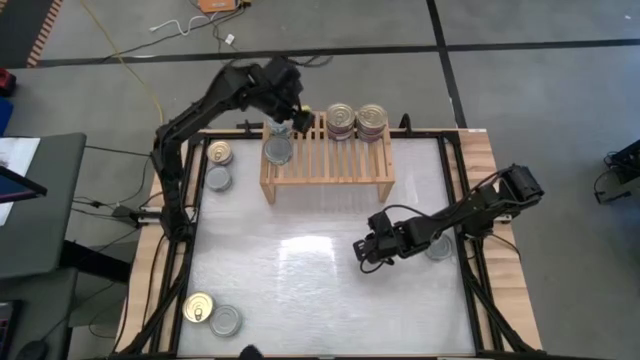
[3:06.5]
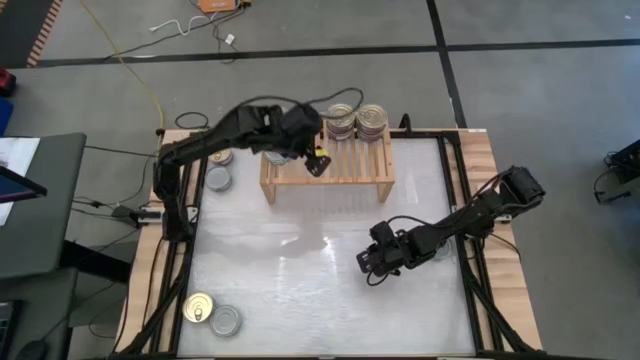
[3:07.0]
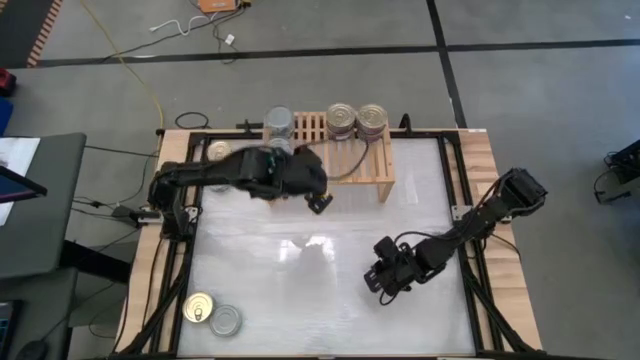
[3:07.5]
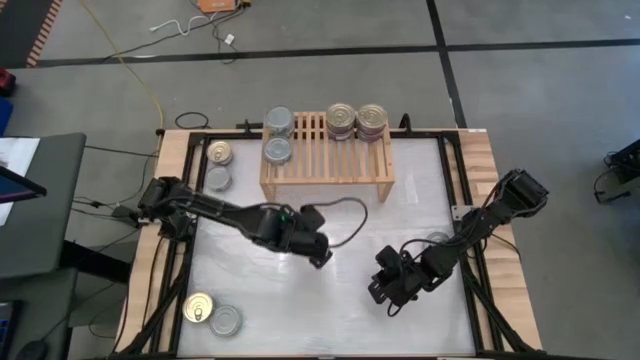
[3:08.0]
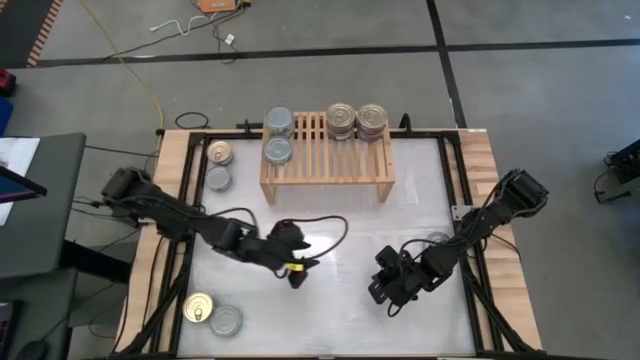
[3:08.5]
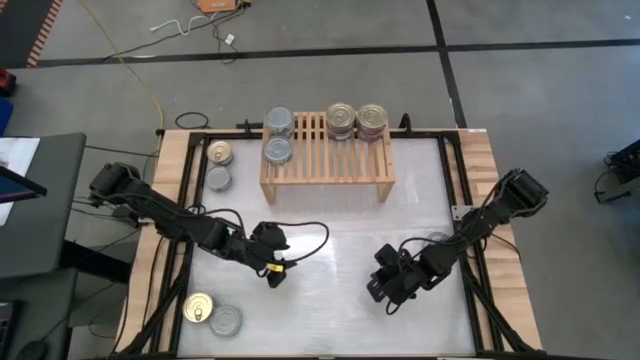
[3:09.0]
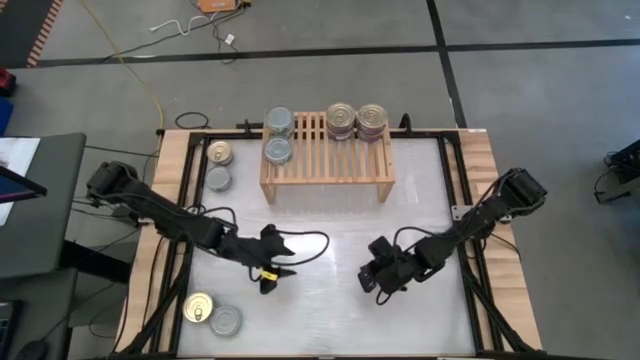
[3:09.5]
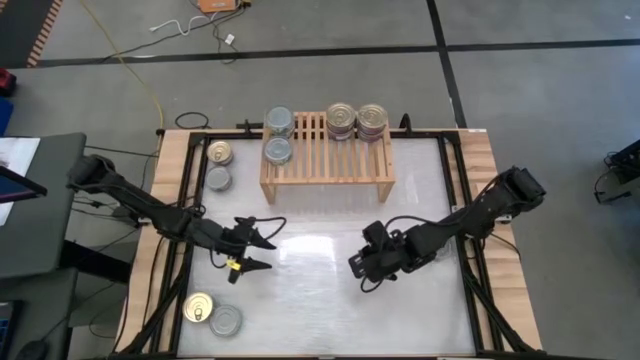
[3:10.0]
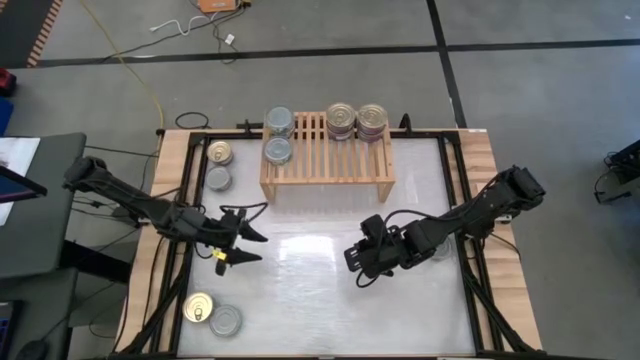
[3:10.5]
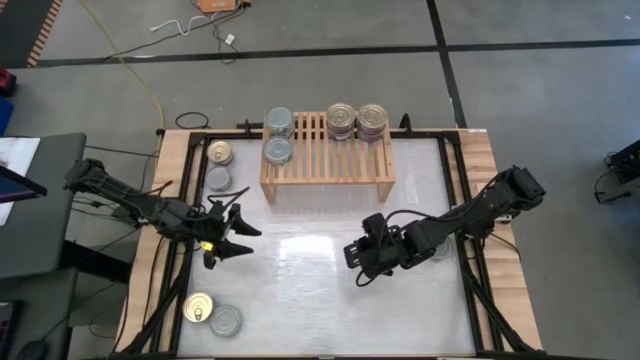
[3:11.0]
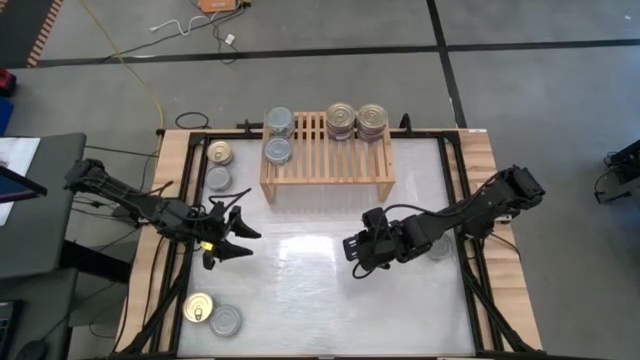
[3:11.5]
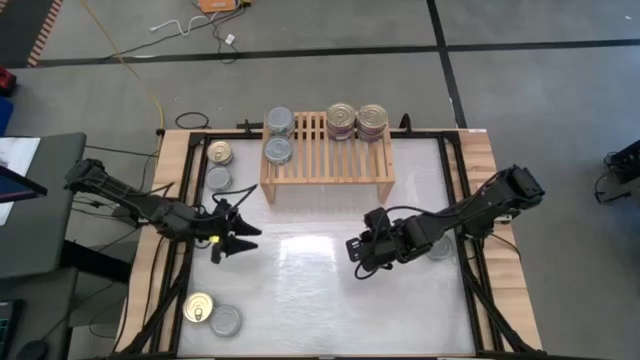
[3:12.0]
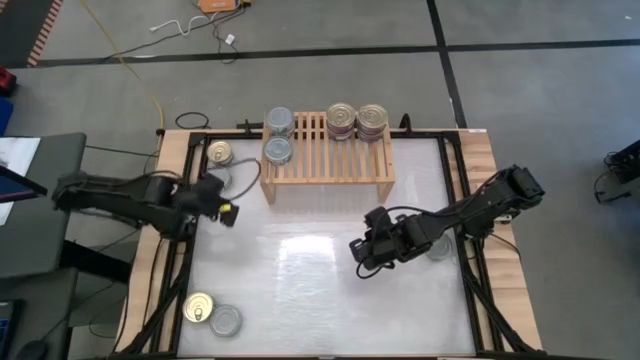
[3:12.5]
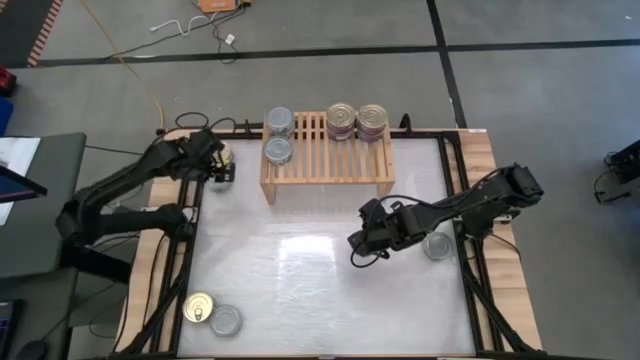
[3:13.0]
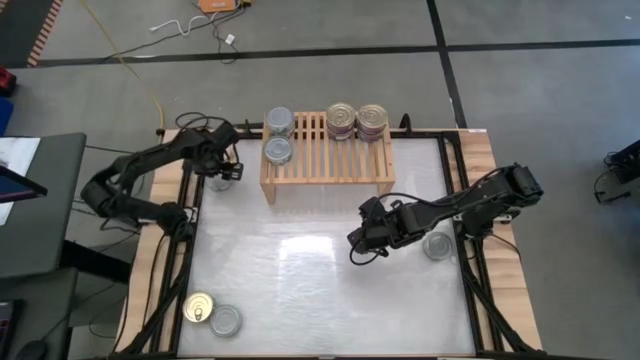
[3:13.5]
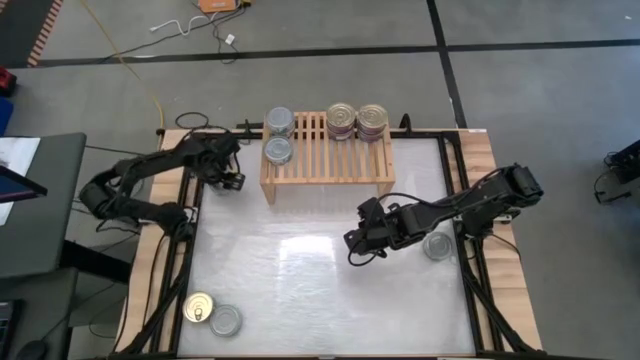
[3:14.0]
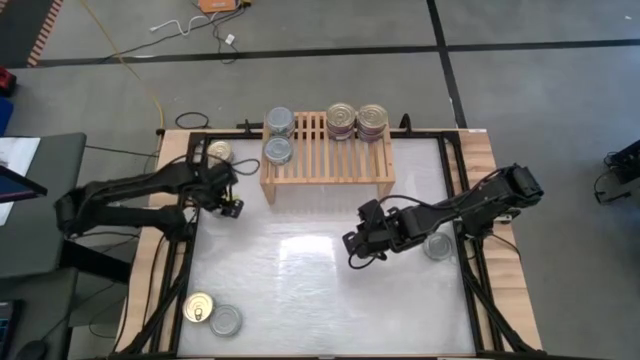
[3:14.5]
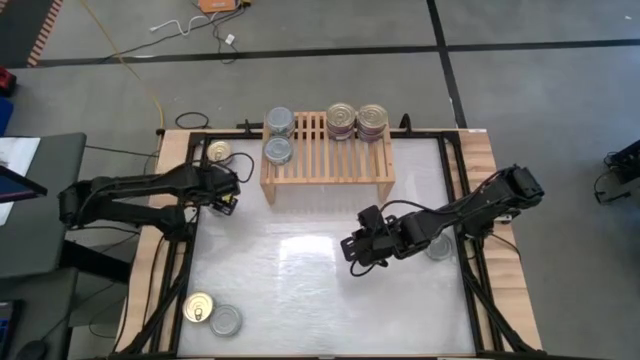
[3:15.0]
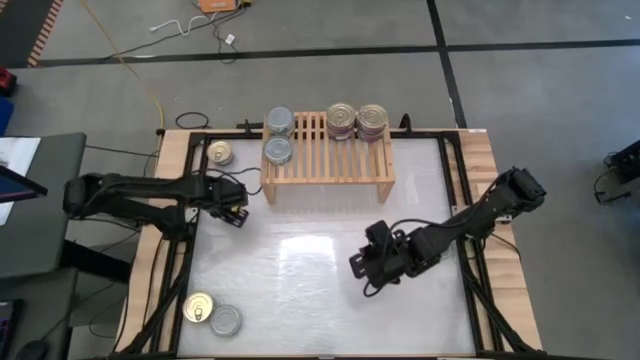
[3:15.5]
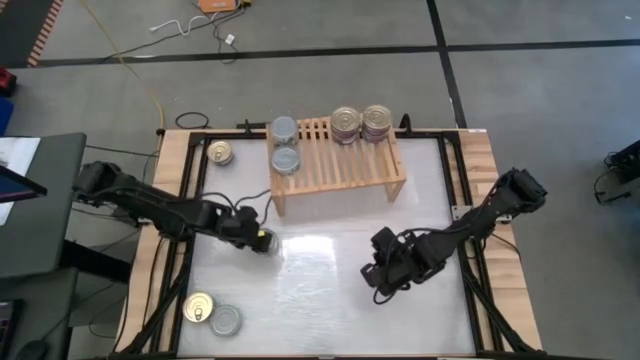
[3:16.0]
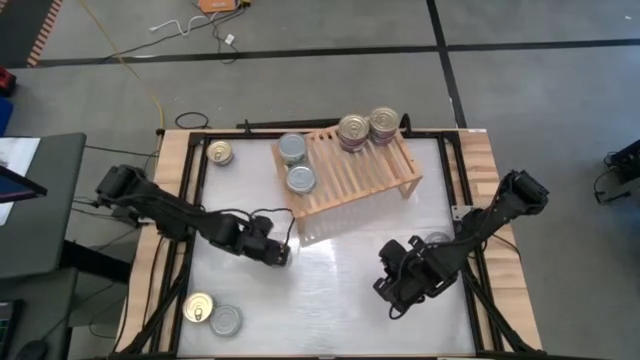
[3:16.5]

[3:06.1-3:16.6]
Task: Stack canned seafood by type on shelf
Move the green tuna can to the center of the table

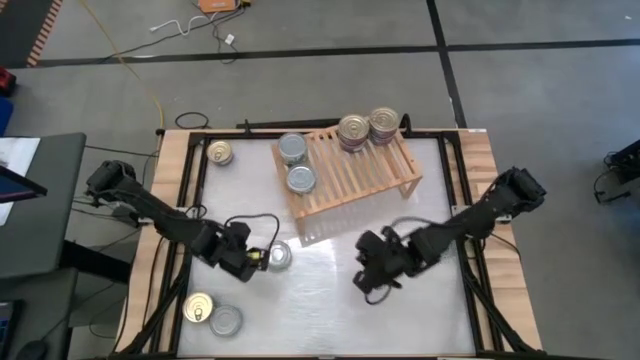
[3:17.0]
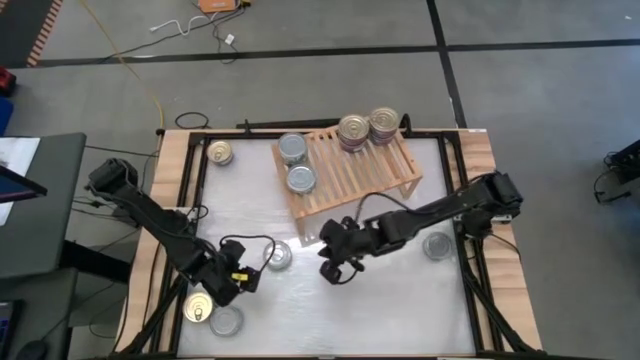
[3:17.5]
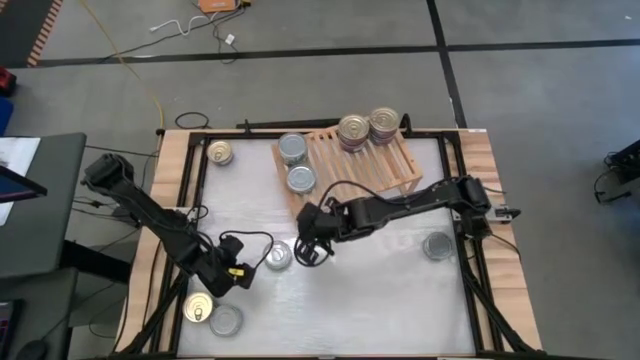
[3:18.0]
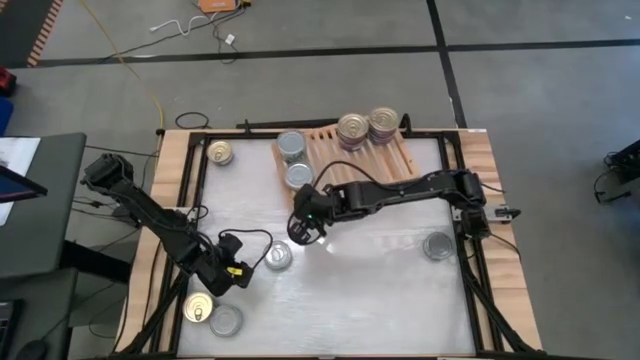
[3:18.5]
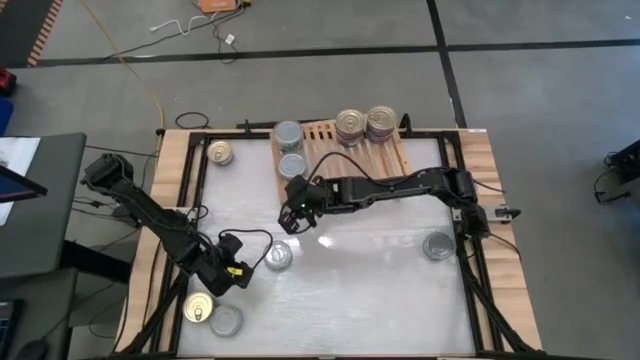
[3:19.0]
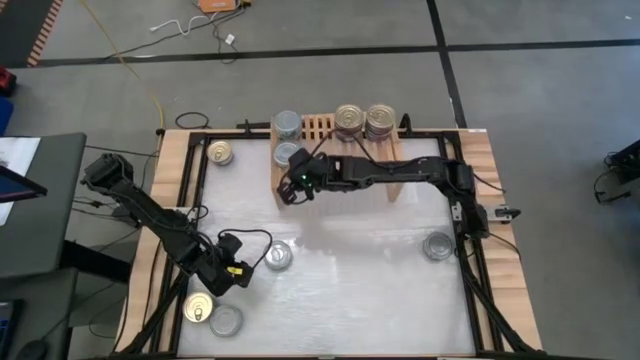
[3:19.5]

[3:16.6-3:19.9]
Adjust the shelf

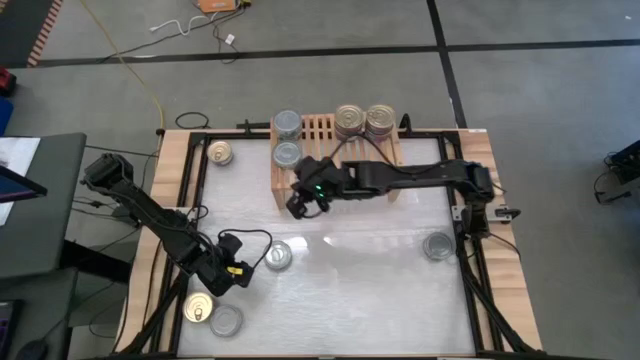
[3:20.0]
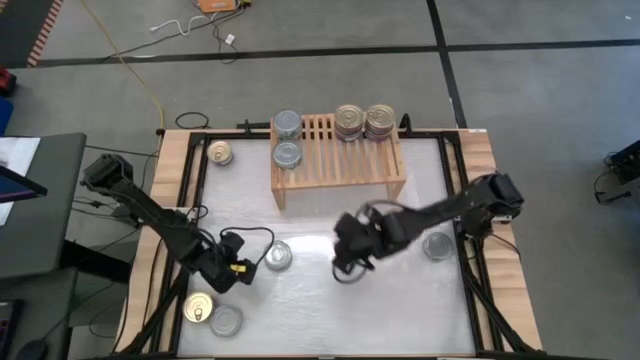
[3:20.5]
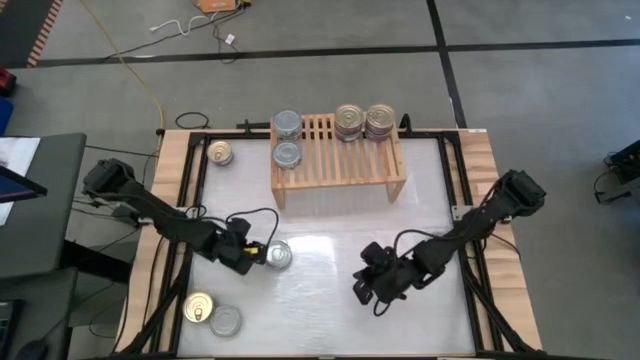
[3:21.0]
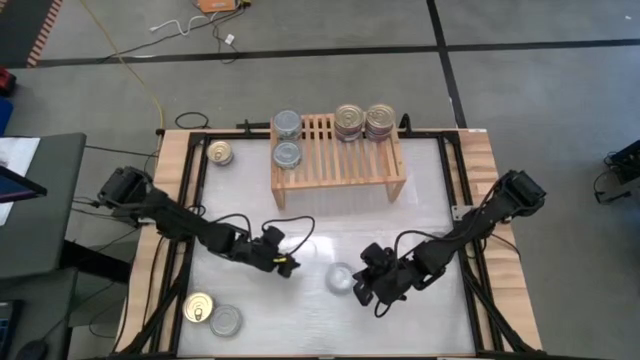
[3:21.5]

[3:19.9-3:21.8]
Move the green tuna can to the center of the table

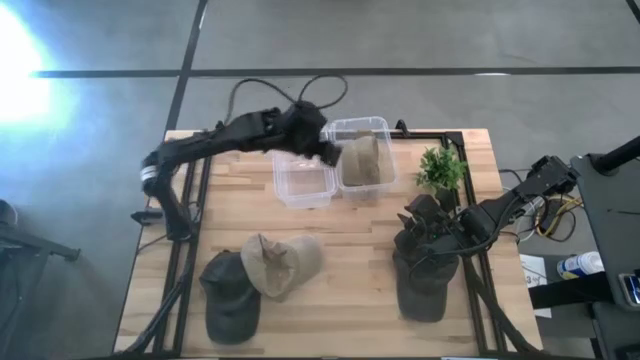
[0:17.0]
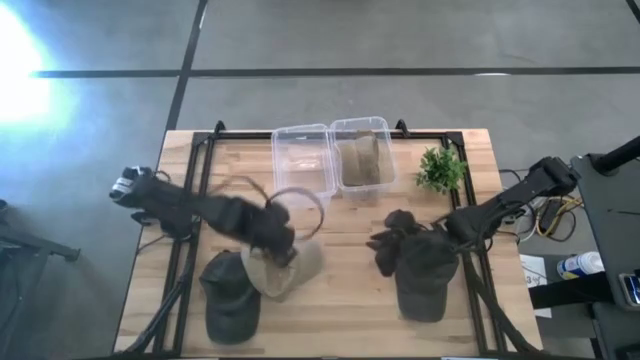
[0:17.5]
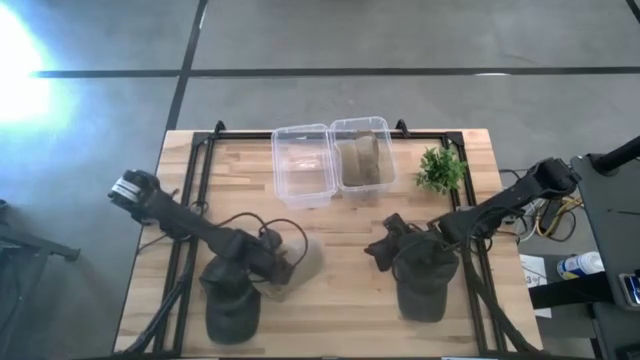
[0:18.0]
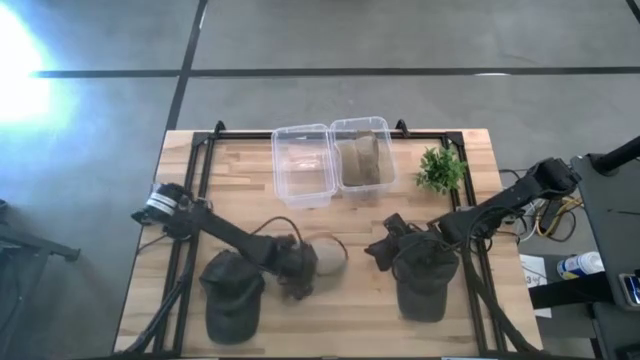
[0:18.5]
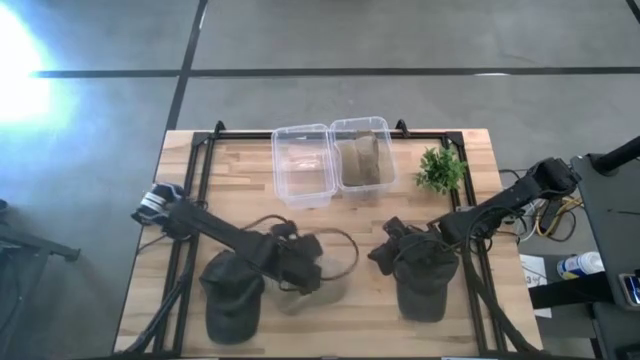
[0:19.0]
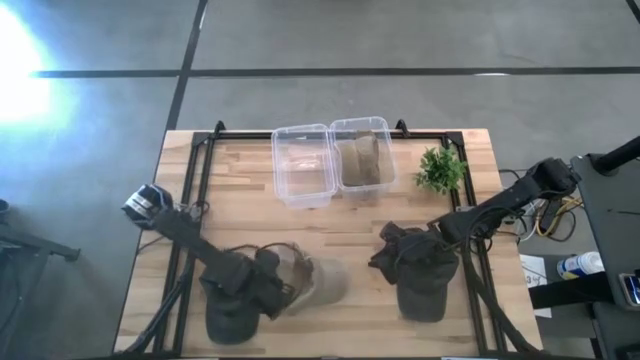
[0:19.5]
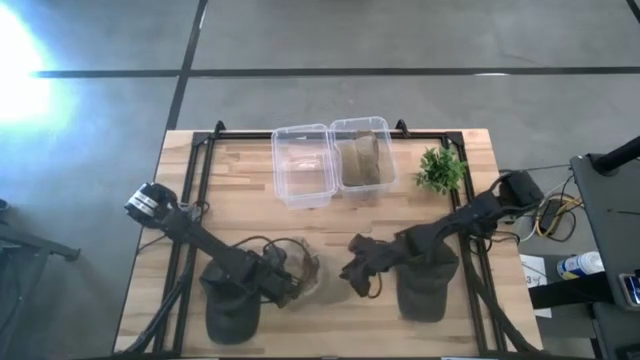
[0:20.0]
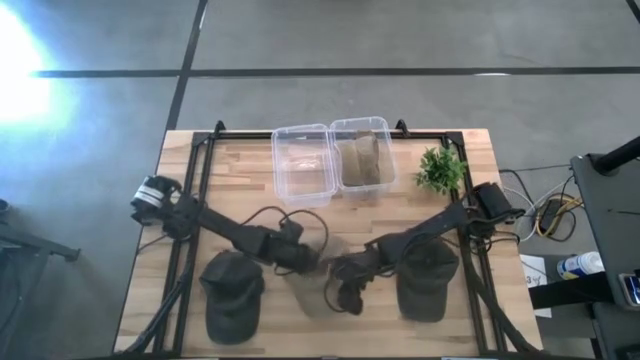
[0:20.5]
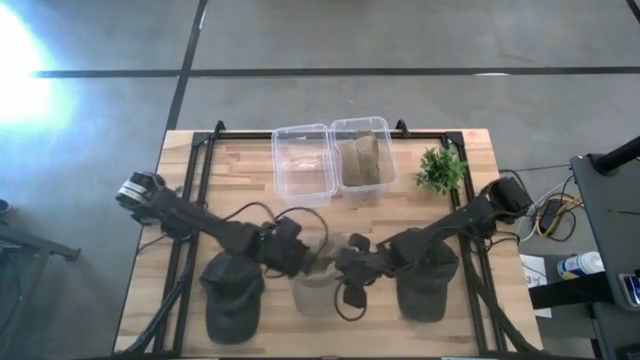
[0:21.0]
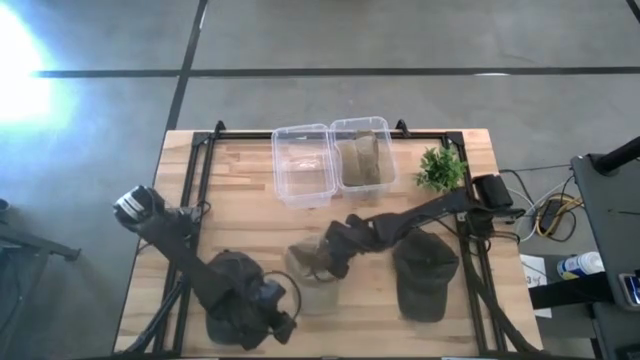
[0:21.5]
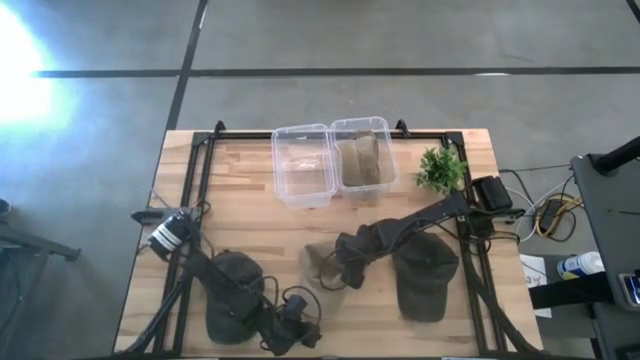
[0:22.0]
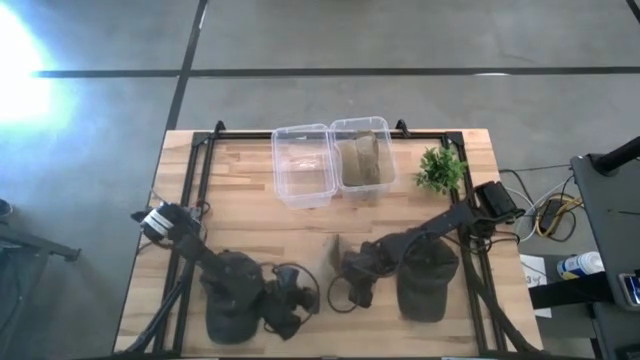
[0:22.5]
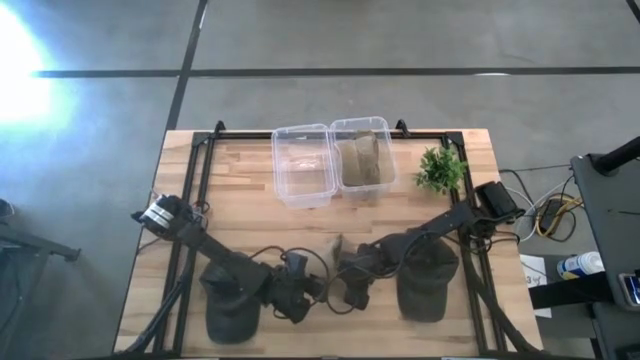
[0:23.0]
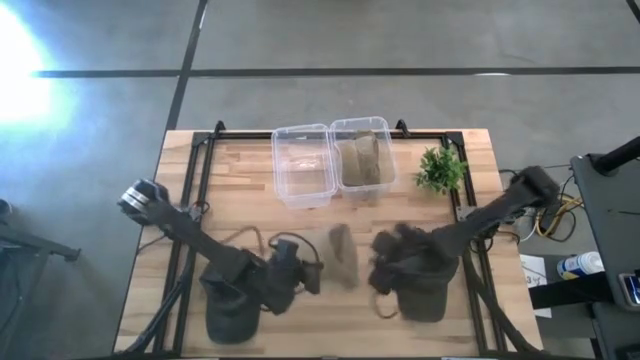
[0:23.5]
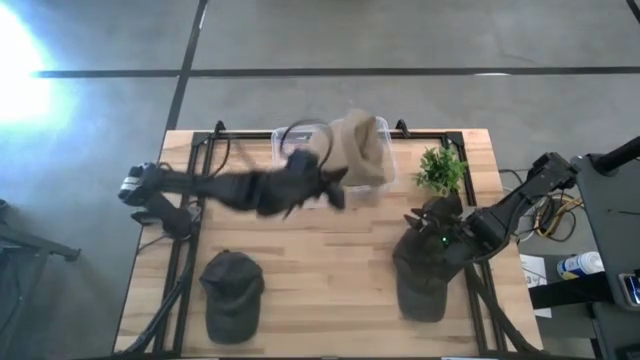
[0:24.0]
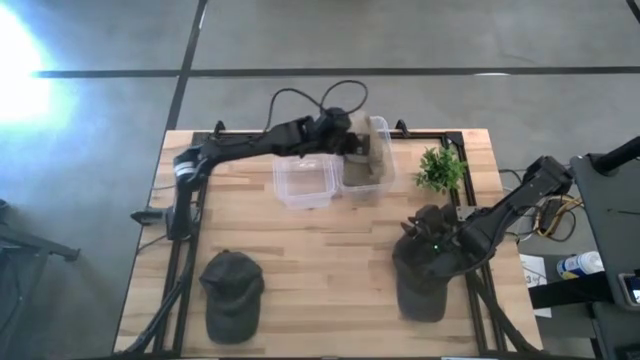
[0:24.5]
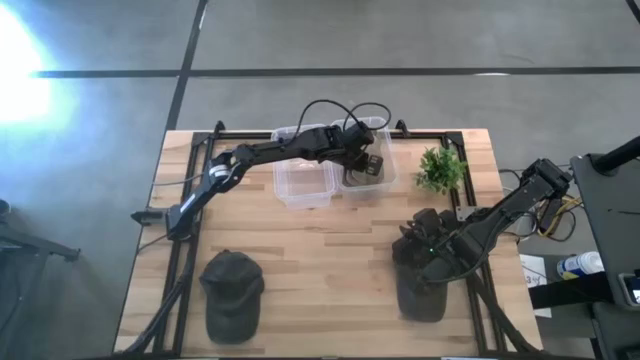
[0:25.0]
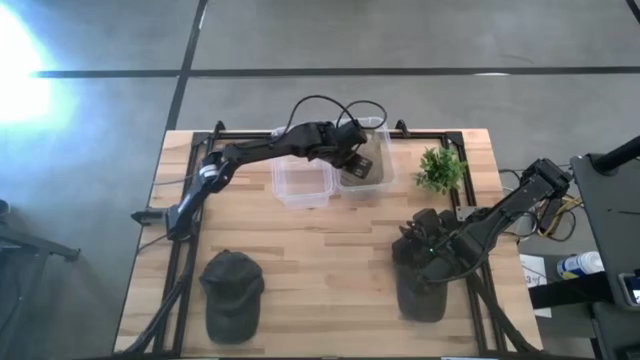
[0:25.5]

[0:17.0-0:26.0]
Task: Pick and place caps into container
Put the brown cap into the right transparent container
